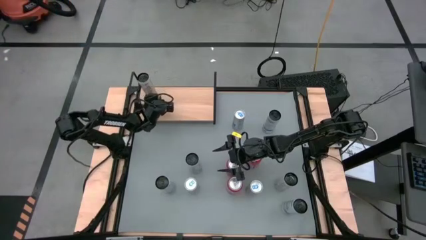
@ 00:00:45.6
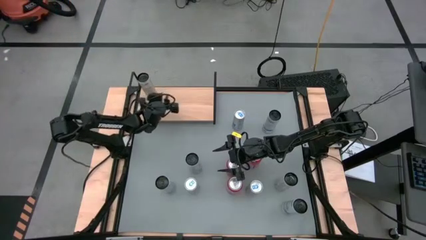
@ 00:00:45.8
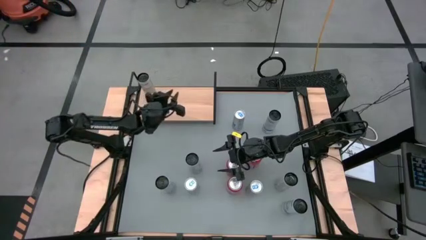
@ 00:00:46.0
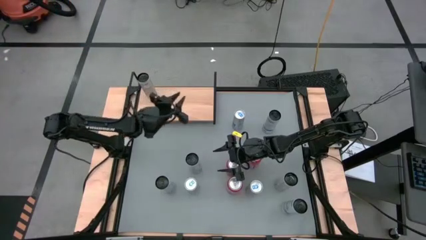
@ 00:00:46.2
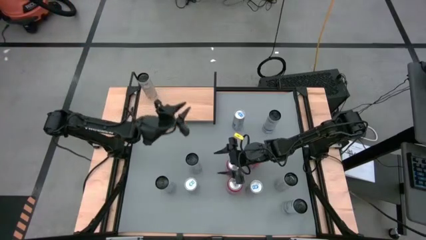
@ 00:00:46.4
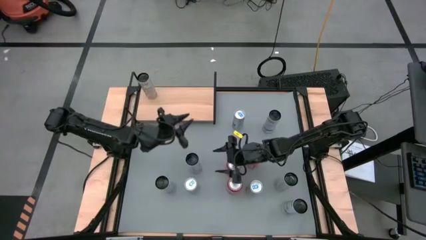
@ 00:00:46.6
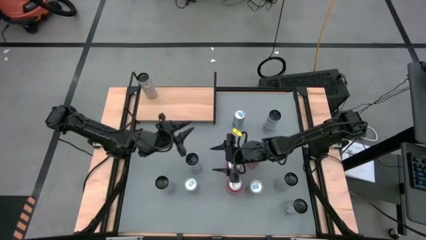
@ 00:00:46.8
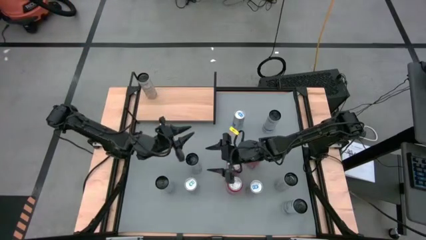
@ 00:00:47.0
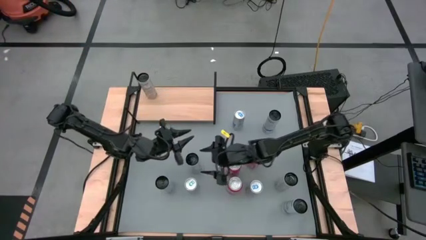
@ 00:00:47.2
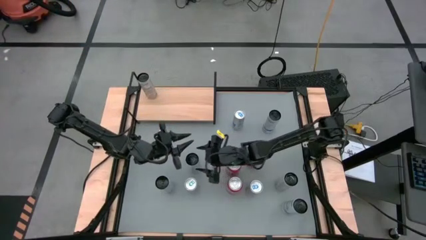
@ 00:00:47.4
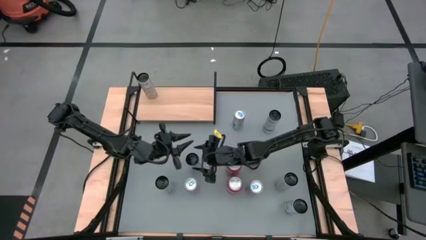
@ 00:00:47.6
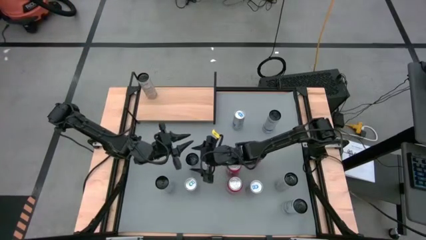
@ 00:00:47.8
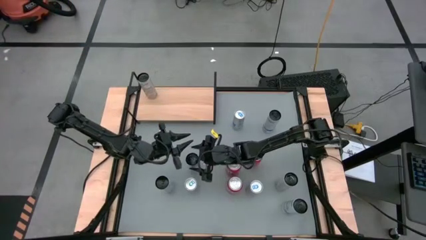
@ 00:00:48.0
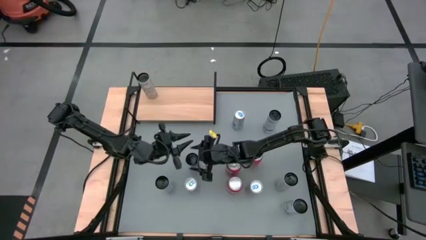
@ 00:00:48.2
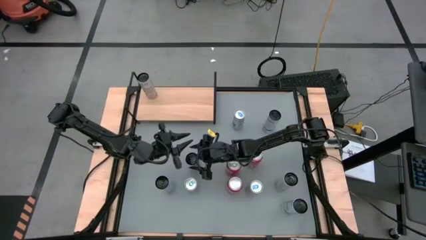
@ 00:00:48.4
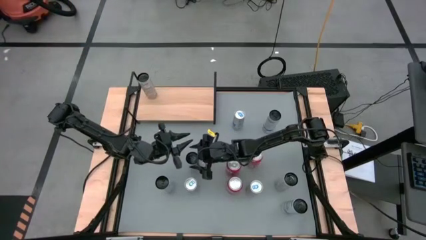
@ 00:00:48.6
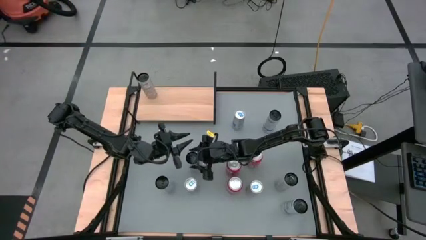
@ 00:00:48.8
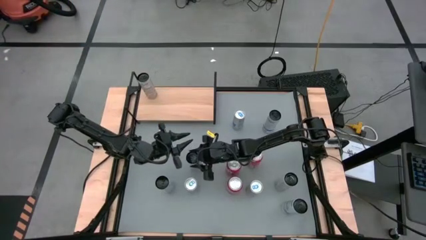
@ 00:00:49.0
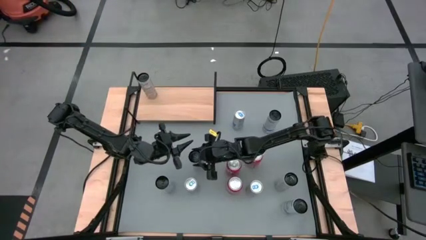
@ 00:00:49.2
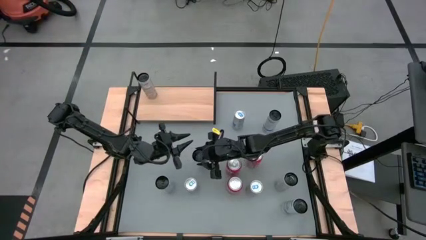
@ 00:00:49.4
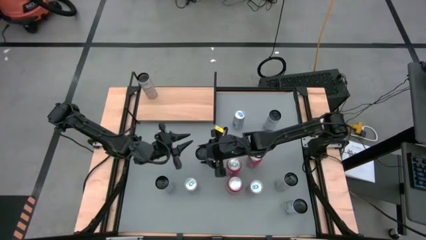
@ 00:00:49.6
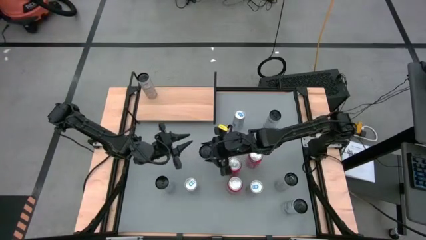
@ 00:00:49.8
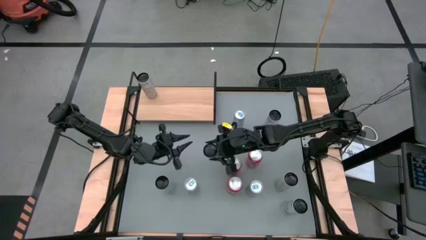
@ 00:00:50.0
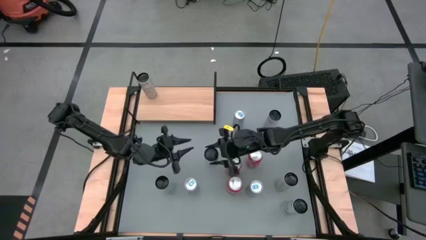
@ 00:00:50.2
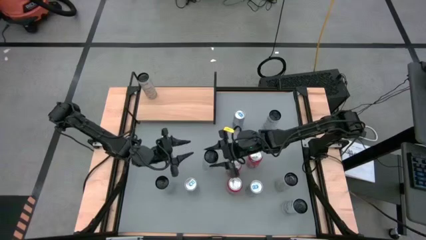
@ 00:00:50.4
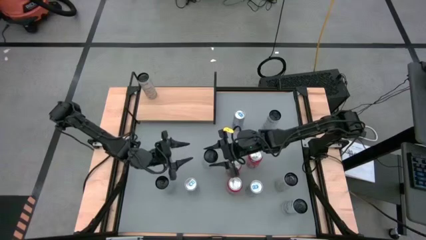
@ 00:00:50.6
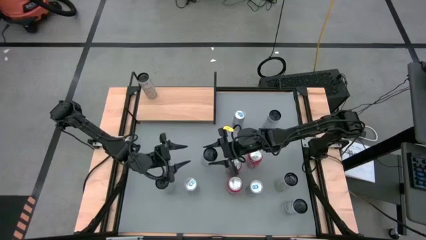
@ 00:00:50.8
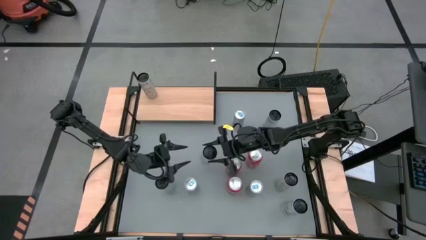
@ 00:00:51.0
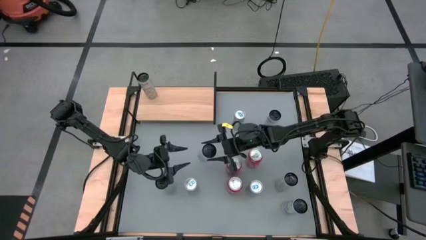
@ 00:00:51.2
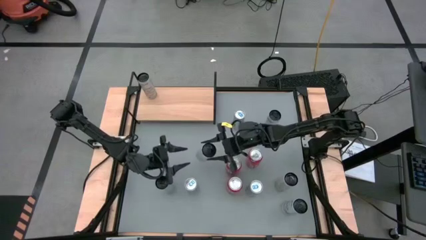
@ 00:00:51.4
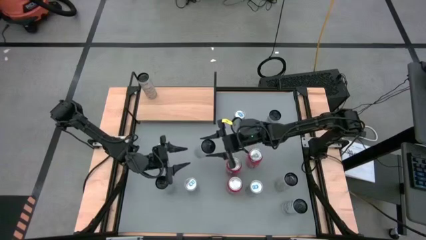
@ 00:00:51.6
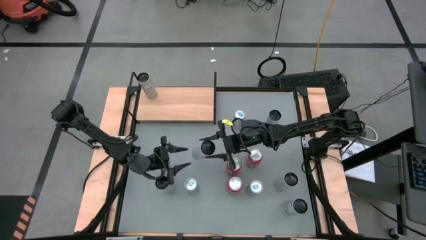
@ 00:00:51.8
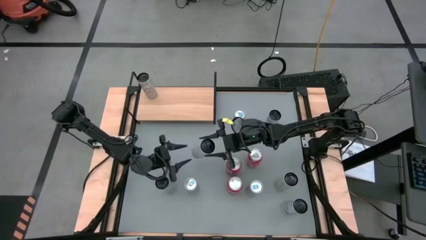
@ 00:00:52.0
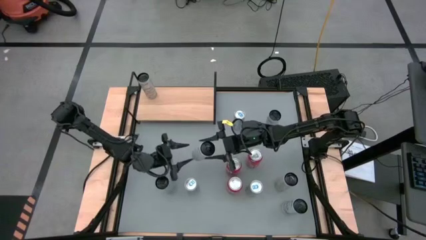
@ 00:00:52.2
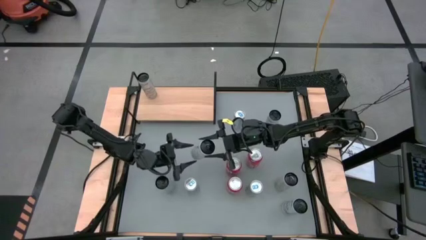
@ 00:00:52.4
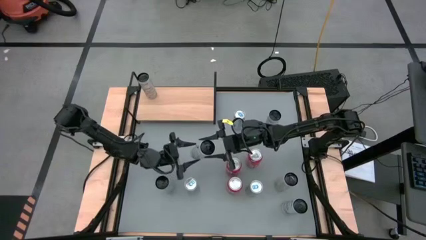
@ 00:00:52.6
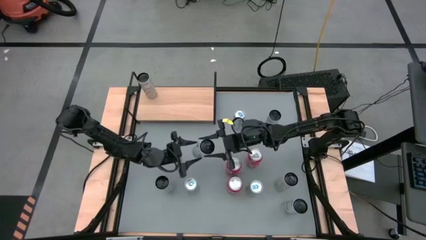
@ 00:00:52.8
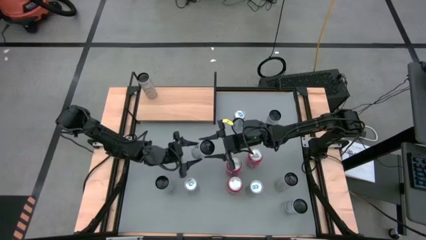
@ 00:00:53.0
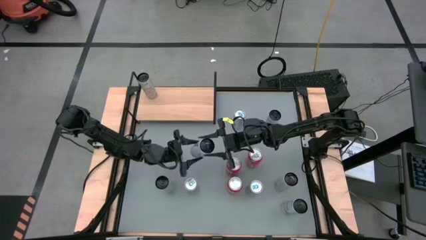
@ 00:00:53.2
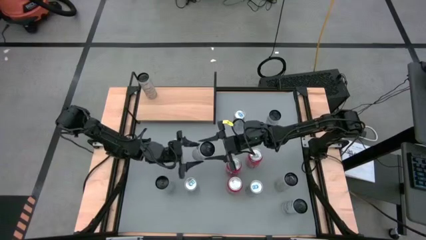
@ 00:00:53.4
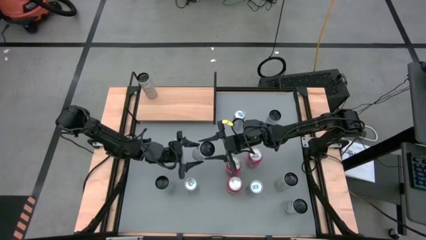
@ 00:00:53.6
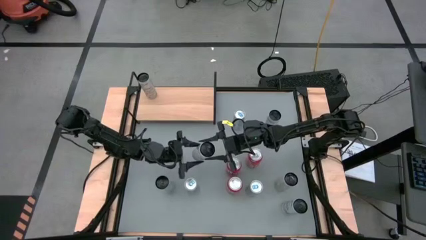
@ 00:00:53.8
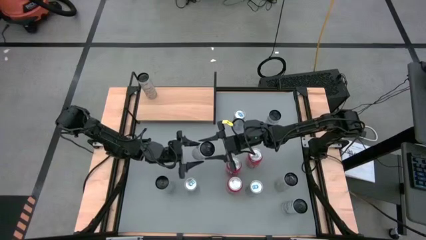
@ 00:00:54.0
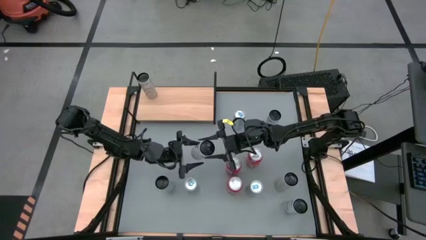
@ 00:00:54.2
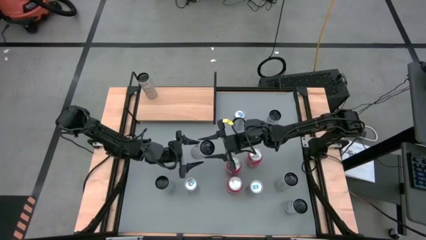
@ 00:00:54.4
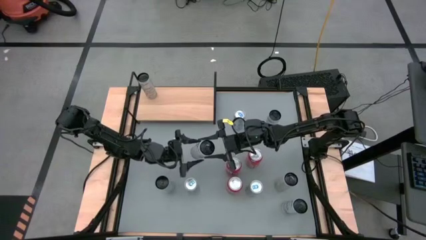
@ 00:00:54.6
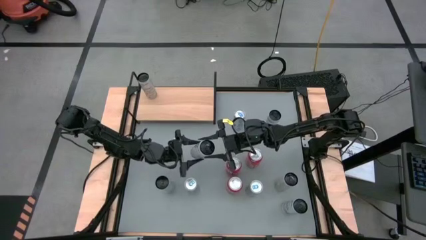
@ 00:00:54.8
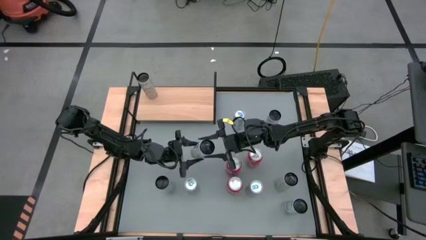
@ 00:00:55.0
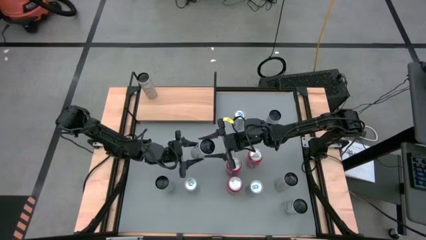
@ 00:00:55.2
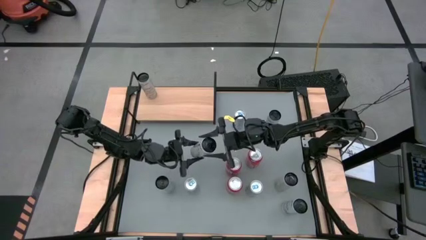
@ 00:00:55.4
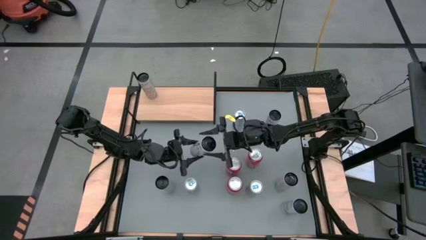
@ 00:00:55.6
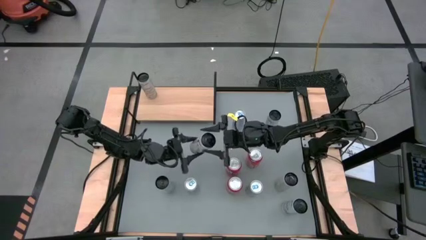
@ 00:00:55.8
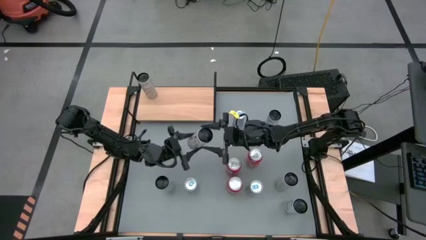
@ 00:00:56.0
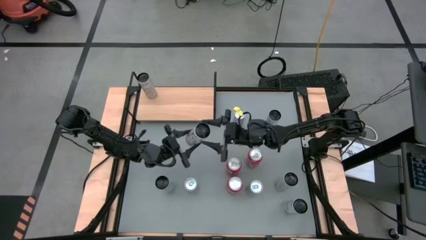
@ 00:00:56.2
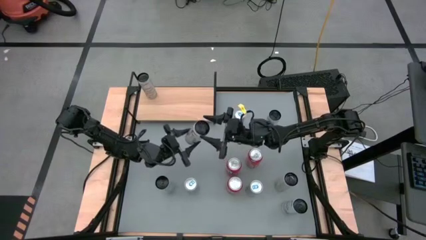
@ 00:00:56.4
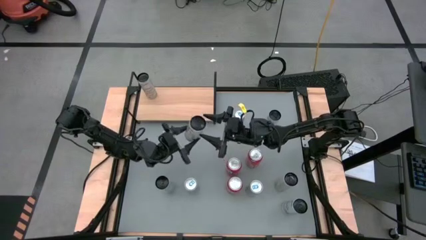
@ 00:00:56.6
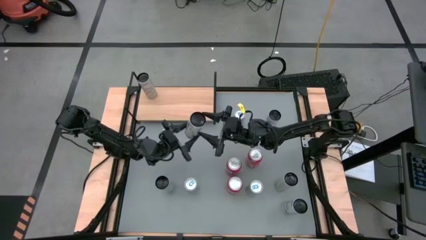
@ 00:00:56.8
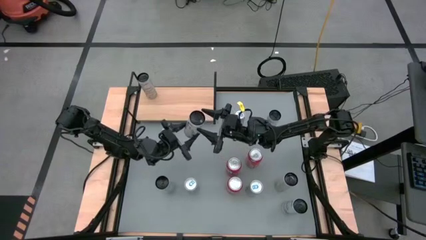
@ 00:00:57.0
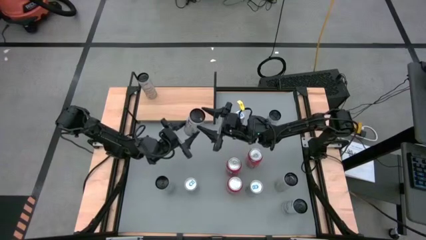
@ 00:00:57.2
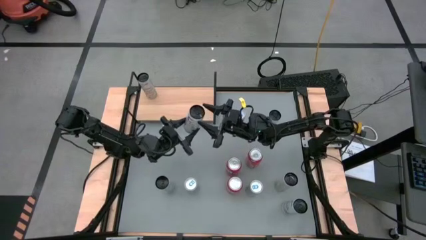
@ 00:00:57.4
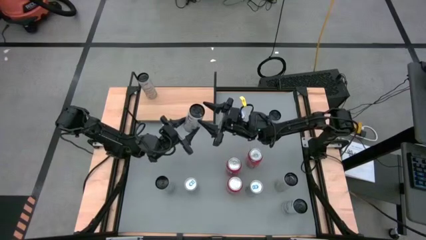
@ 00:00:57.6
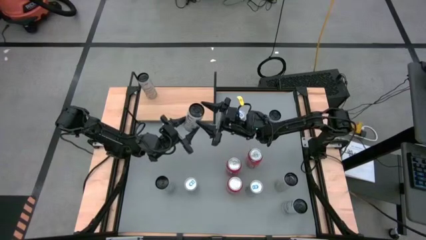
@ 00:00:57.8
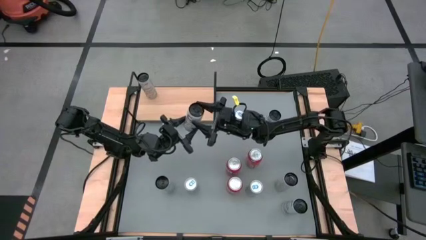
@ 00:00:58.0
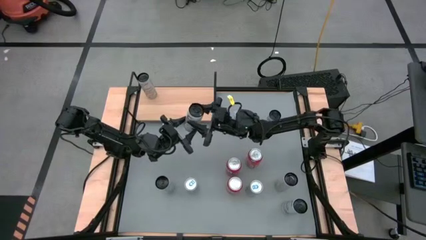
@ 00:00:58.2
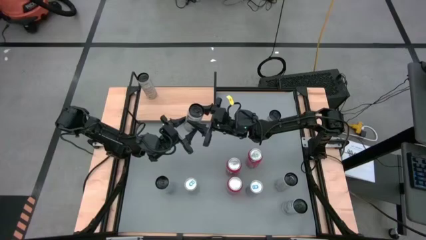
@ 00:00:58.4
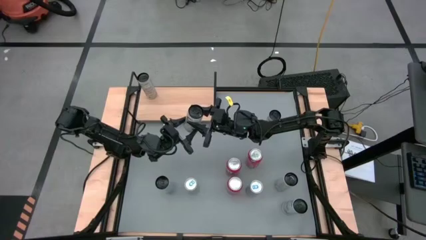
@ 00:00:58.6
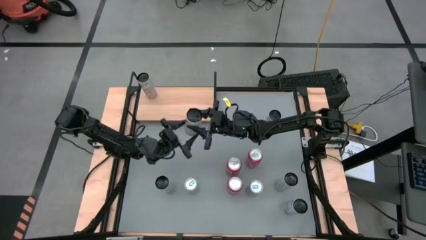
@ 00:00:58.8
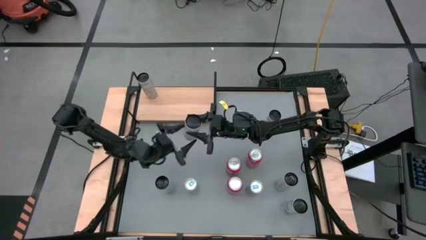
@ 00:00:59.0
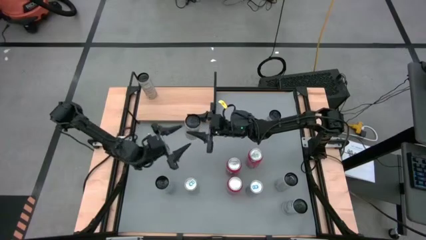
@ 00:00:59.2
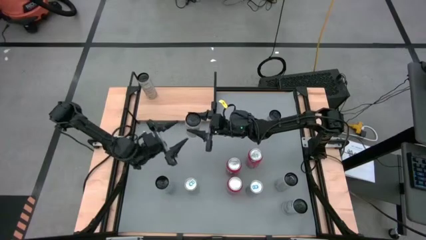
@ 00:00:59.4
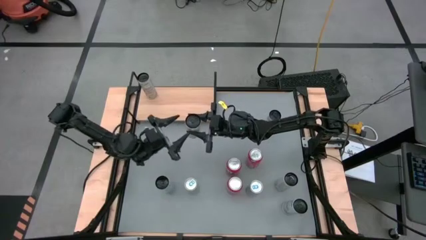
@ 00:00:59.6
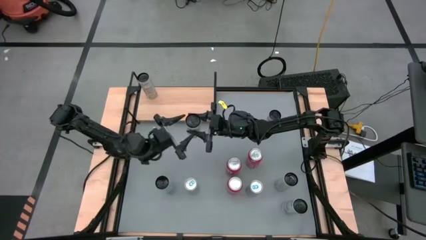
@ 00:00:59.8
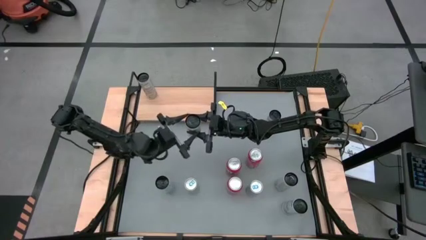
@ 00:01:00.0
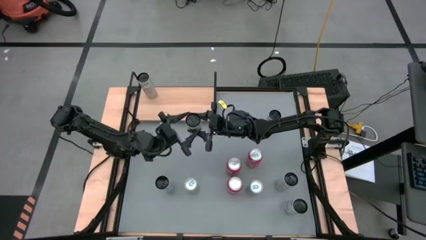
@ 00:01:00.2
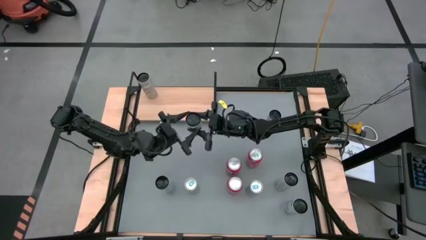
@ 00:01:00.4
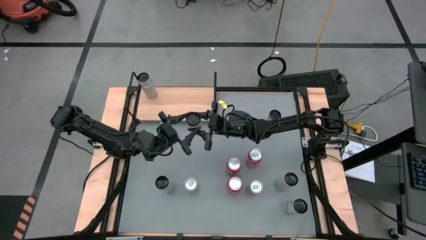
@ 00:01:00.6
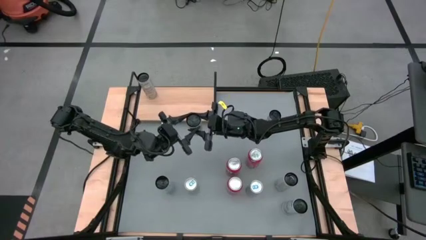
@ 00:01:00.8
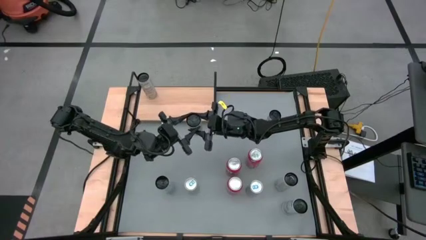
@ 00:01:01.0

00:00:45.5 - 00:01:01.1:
Task: Place canned beverage on shelf
Put the top white-yellow soda can on the shelf aligned with the other white-yellow soda can
